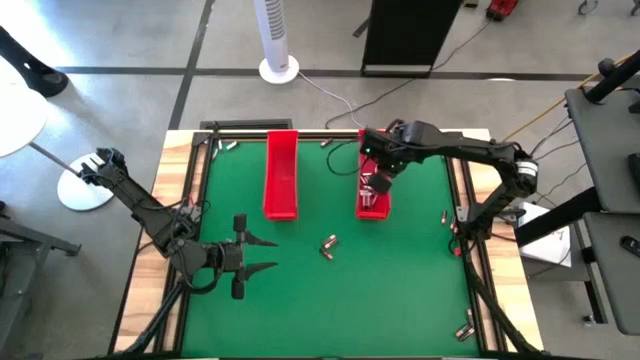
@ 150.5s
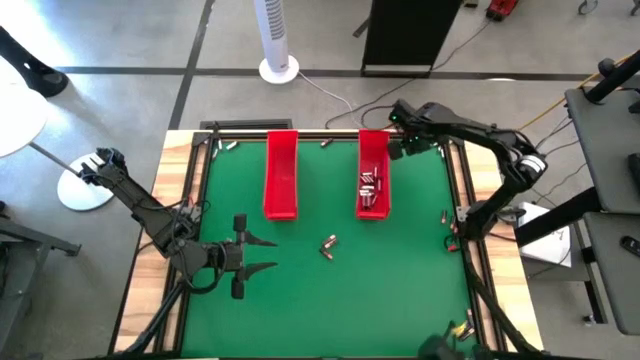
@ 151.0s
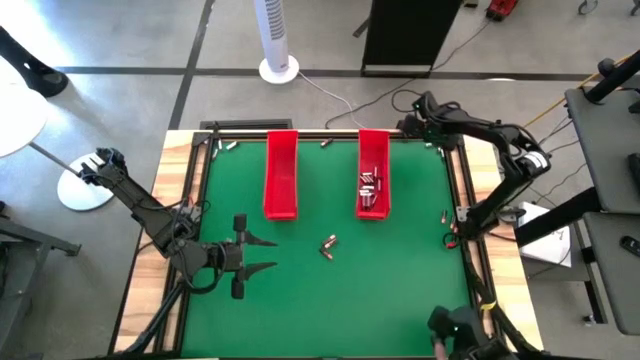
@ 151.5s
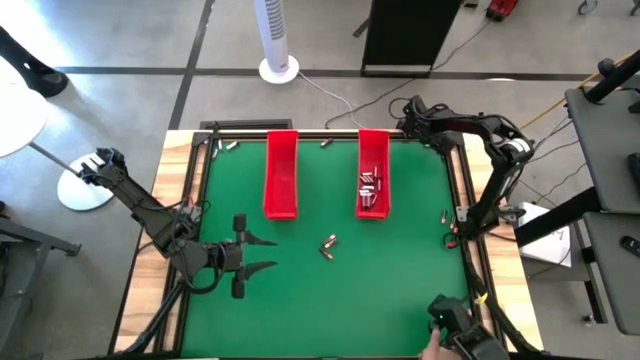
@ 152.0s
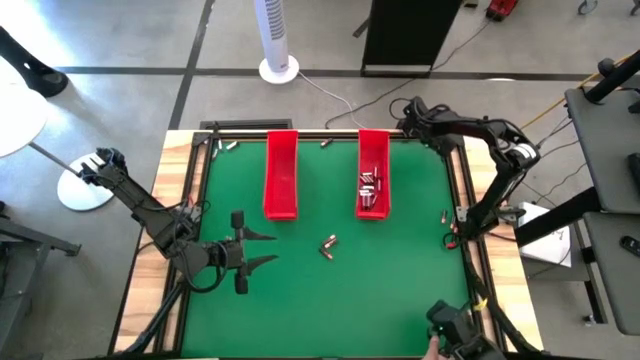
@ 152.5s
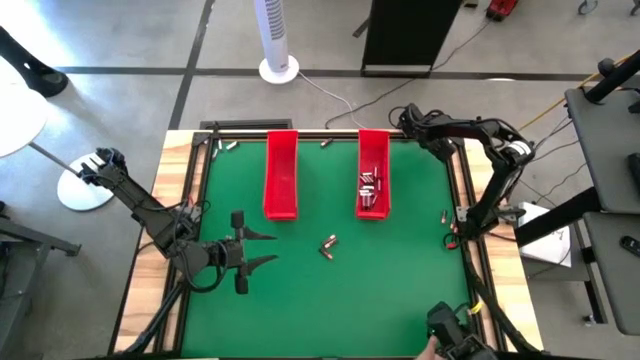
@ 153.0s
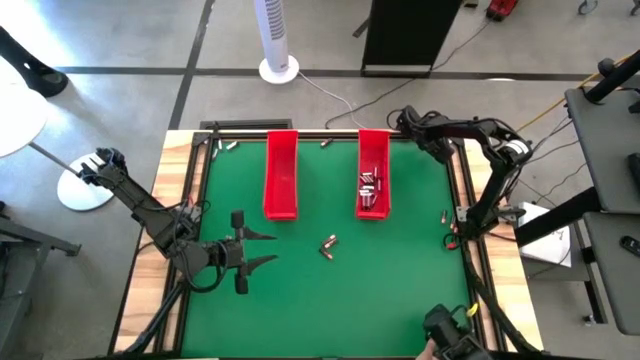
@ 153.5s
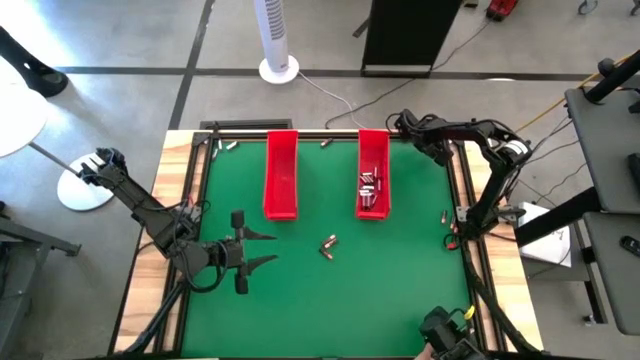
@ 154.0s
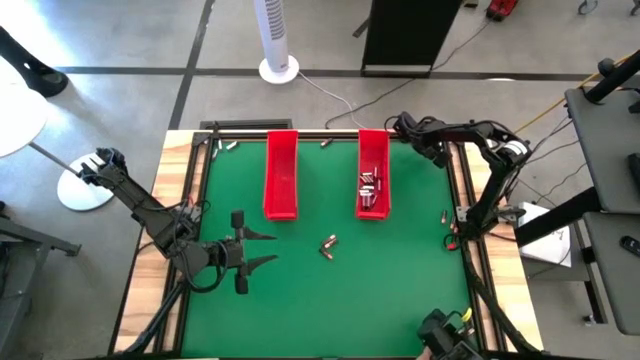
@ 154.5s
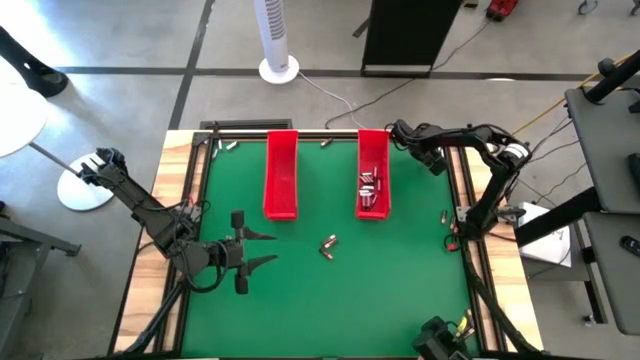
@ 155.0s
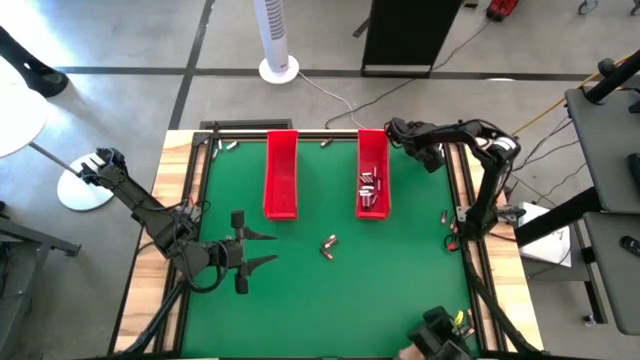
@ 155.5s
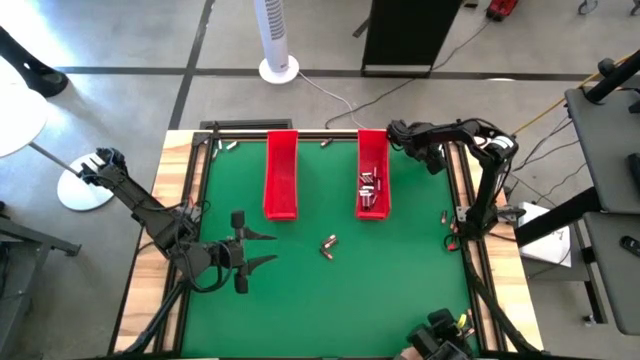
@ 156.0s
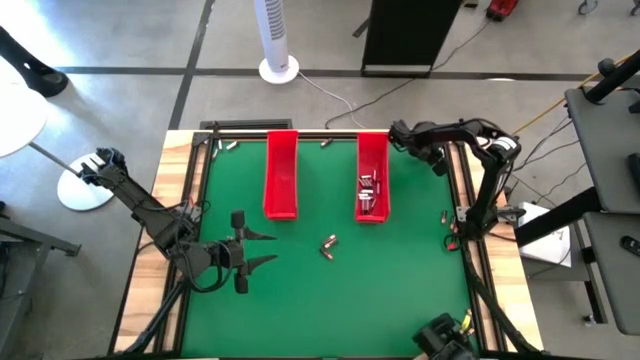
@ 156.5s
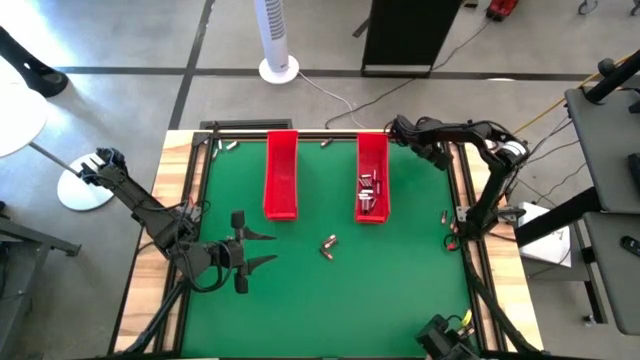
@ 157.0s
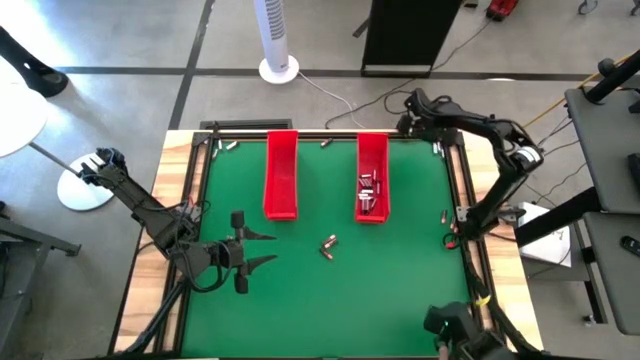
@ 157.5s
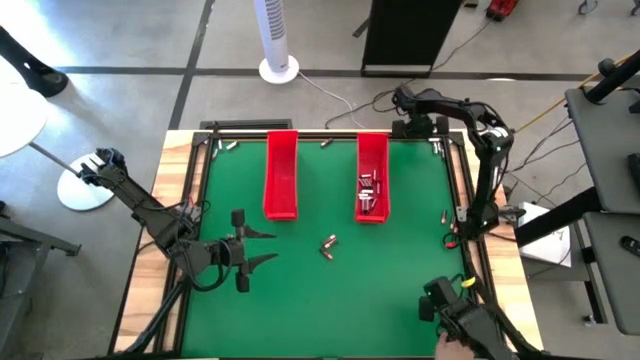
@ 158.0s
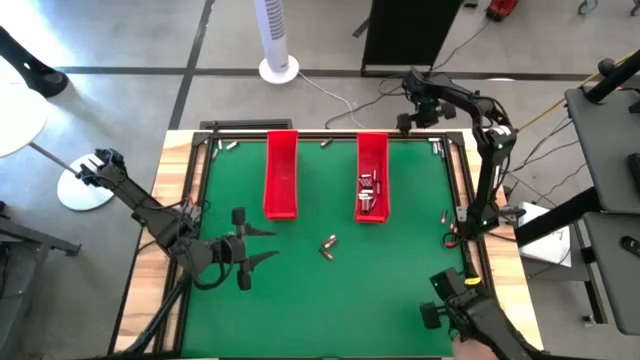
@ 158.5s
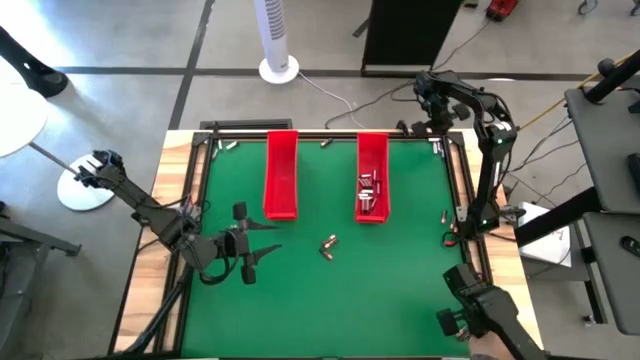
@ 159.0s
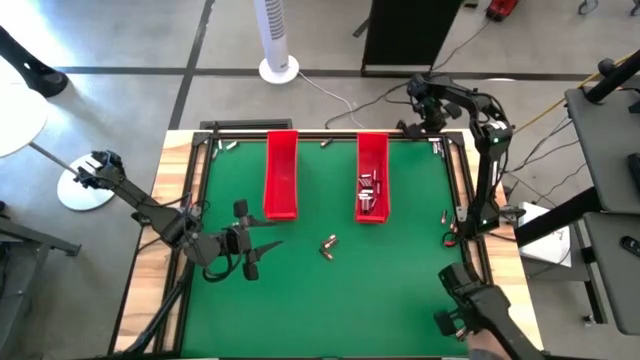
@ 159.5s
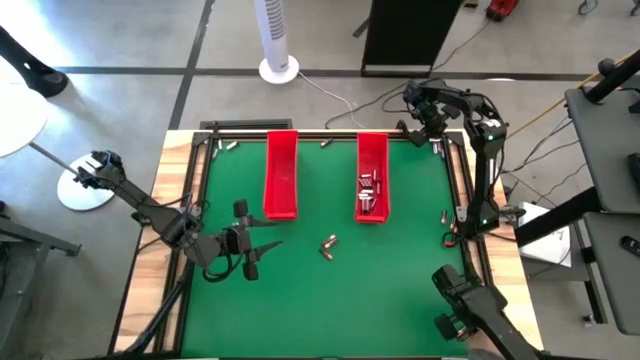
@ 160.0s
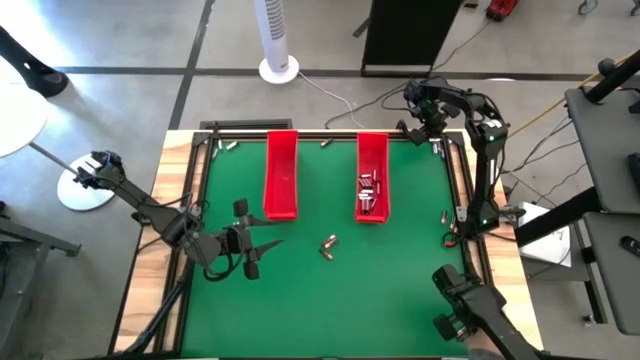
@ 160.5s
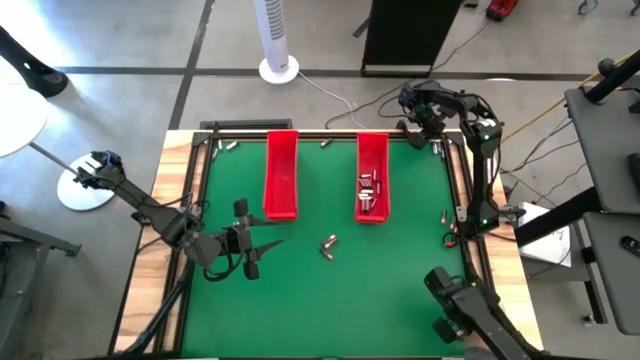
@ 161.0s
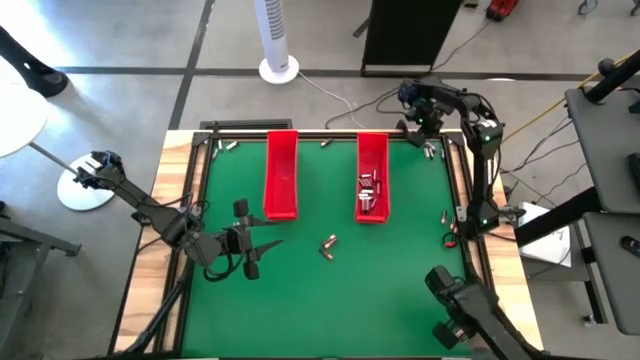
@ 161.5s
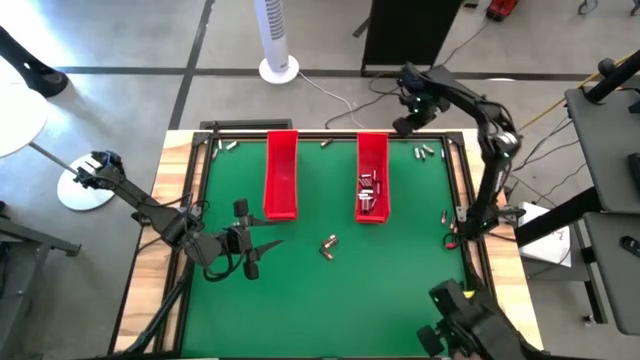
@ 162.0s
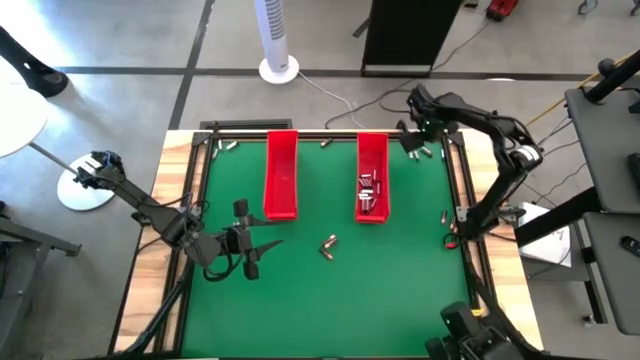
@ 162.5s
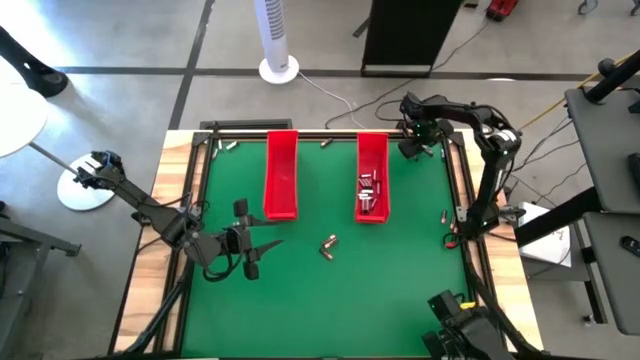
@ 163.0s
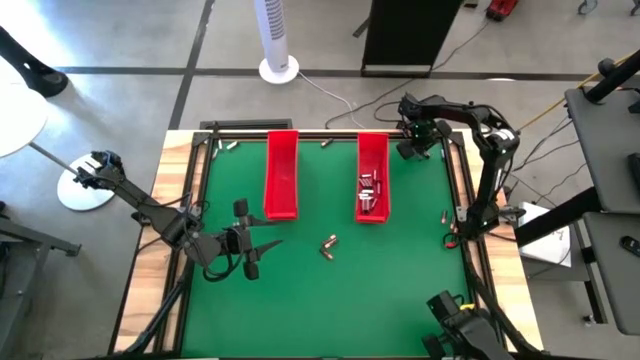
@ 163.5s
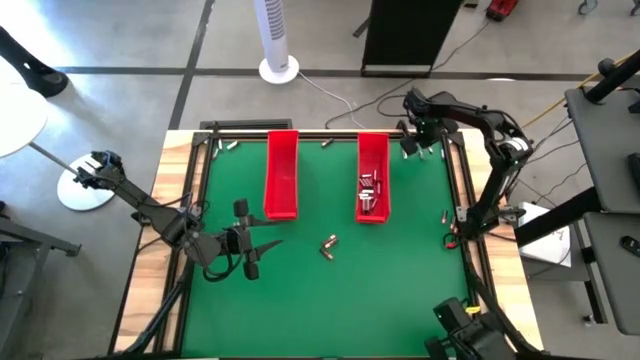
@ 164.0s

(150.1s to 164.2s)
Task: Sort batteries
Put the silver battery into the right red bin

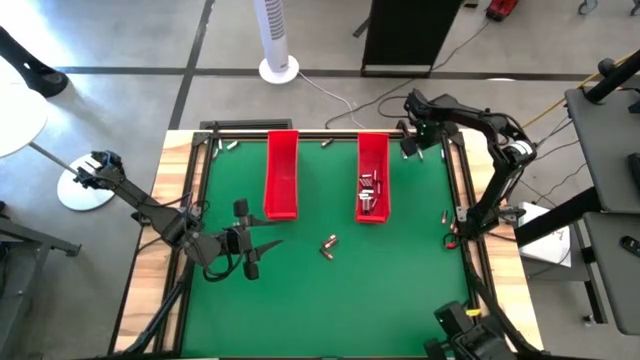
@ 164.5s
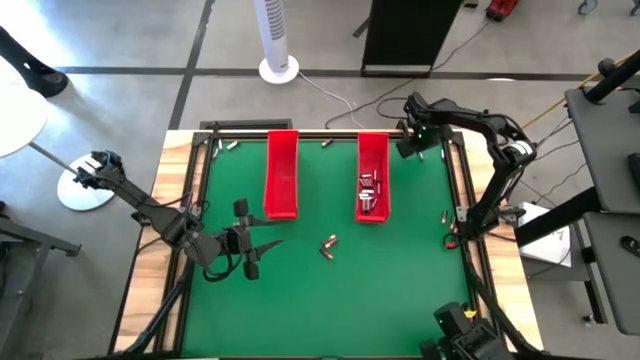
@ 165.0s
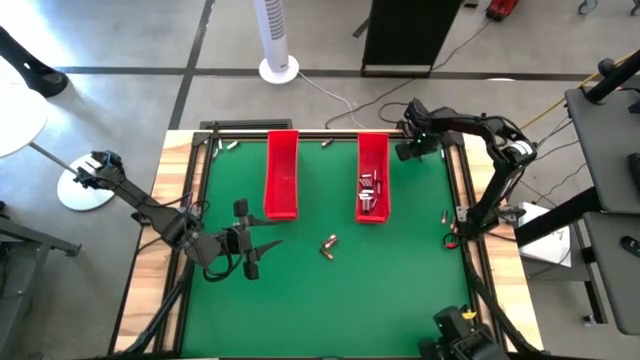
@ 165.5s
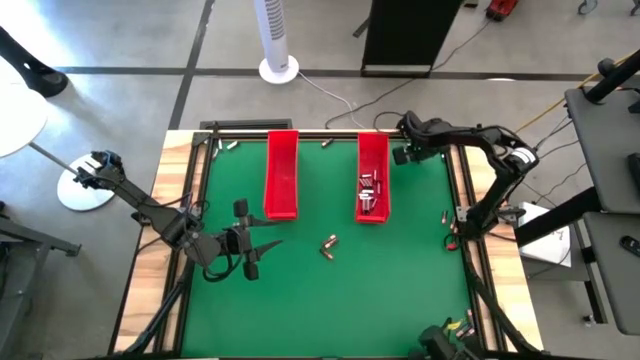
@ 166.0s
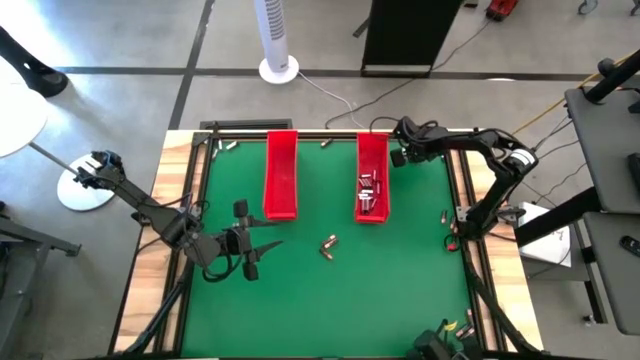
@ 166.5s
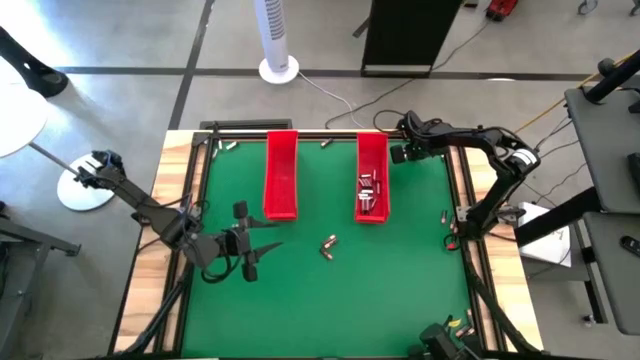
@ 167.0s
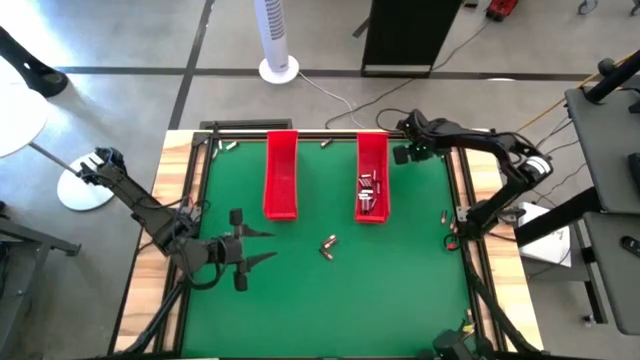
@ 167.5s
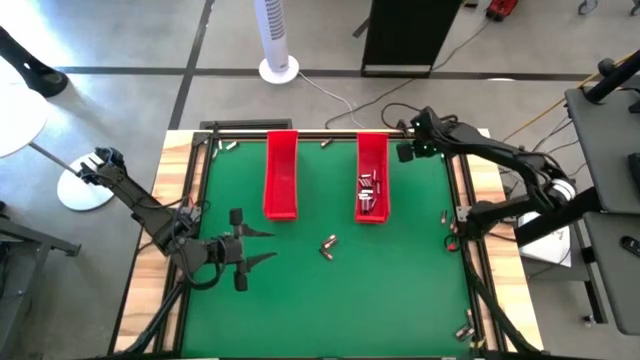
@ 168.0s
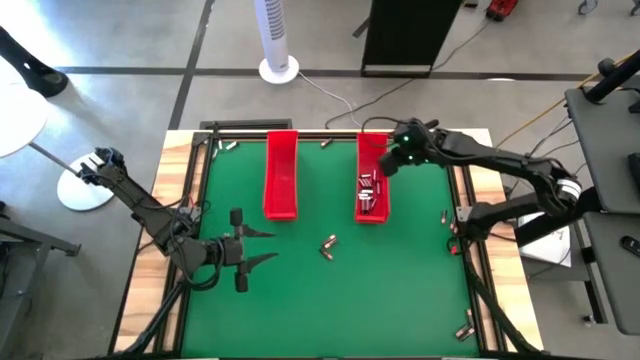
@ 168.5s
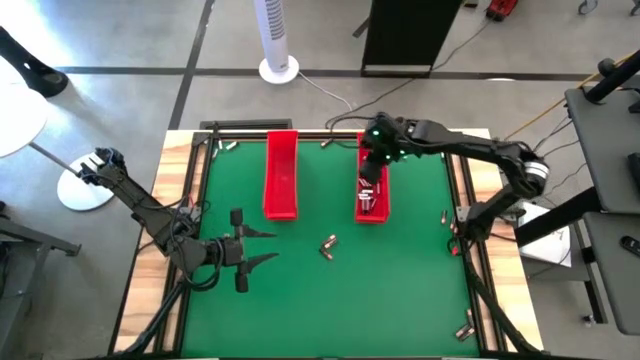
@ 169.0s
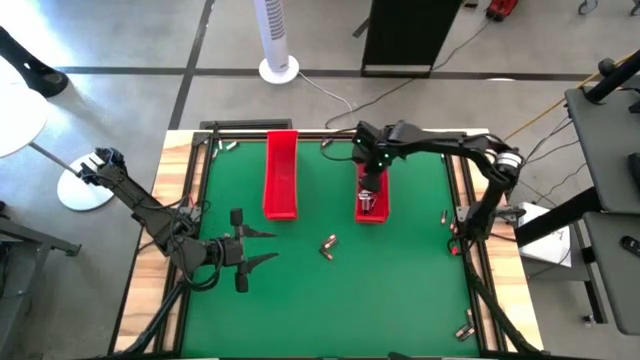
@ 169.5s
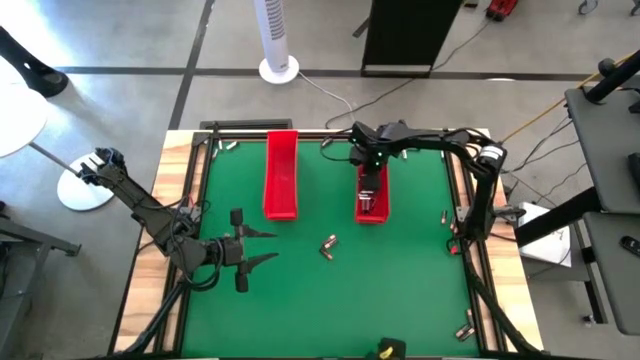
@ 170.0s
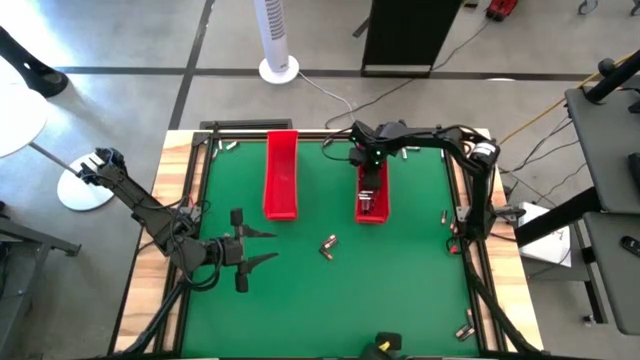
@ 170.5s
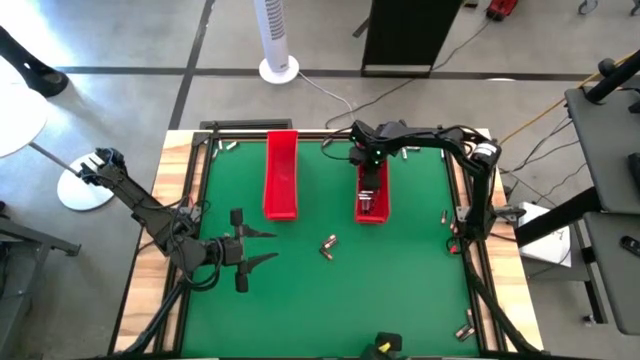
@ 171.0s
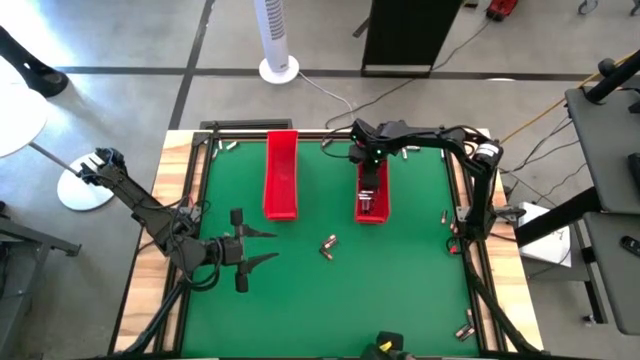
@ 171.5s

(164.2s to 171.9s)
Put the silver battery into the right red bin
